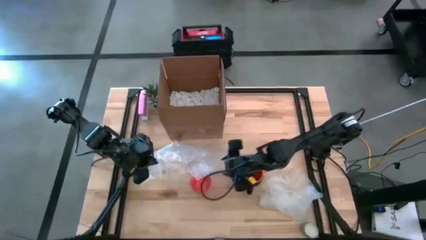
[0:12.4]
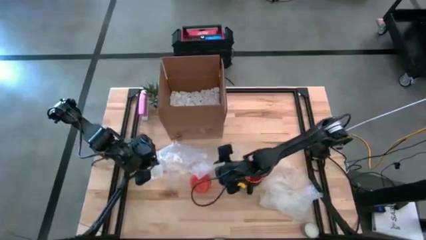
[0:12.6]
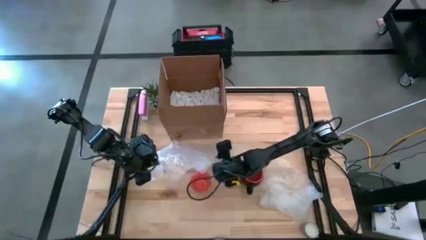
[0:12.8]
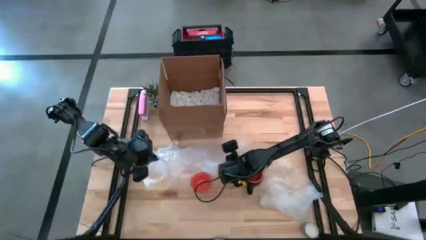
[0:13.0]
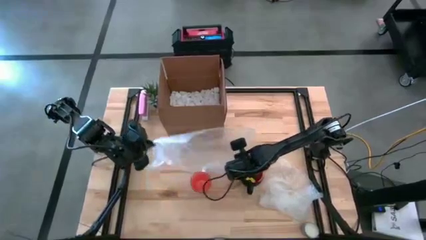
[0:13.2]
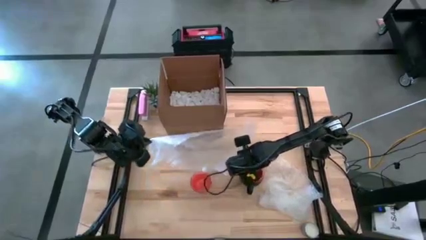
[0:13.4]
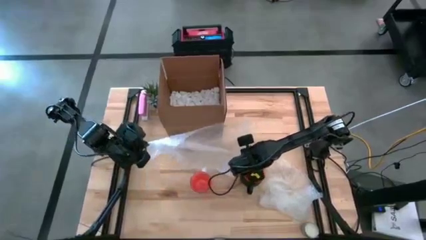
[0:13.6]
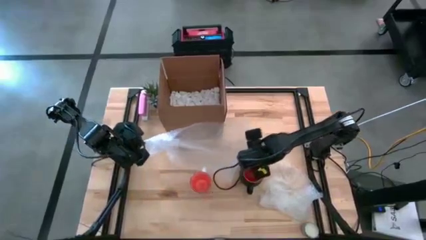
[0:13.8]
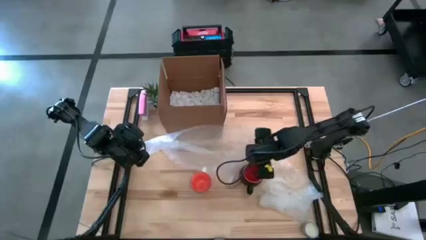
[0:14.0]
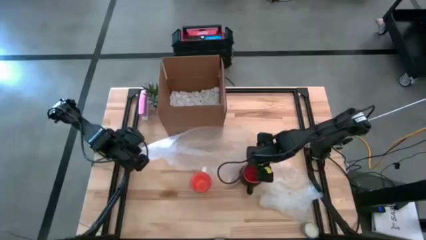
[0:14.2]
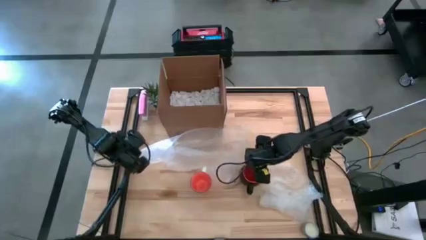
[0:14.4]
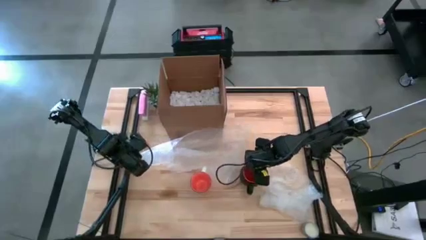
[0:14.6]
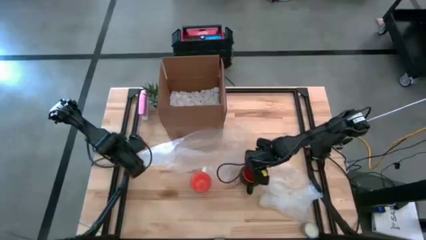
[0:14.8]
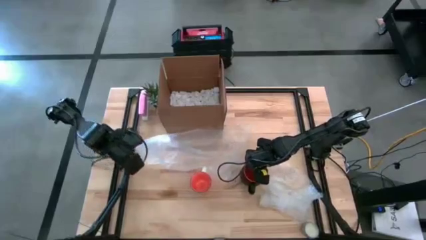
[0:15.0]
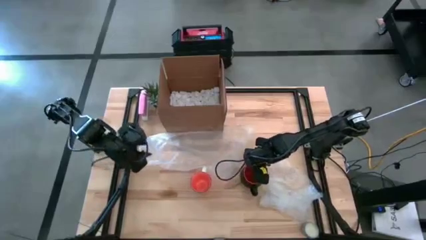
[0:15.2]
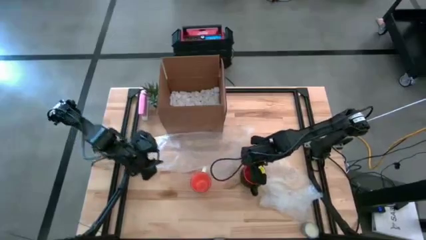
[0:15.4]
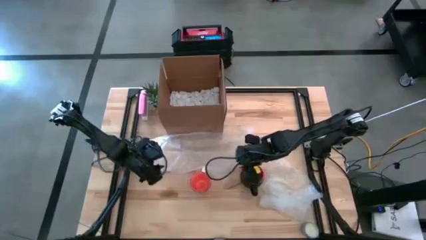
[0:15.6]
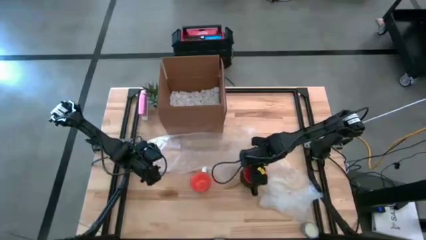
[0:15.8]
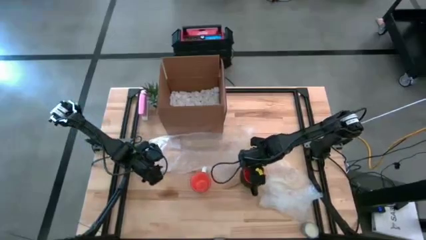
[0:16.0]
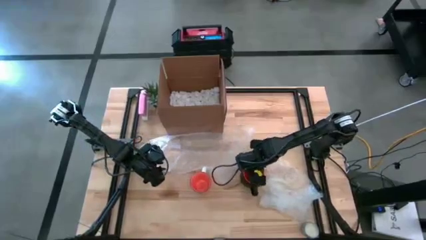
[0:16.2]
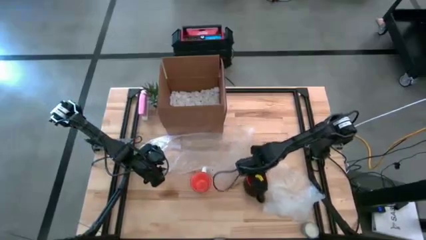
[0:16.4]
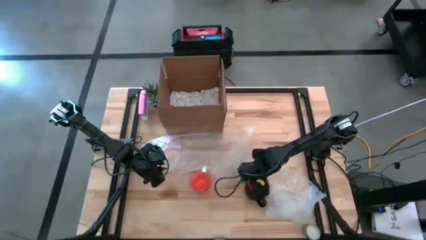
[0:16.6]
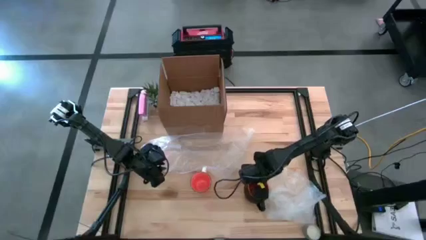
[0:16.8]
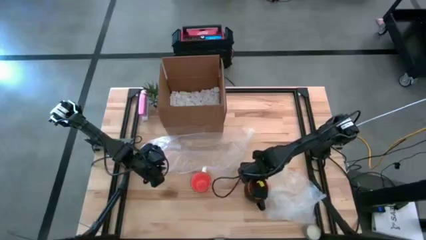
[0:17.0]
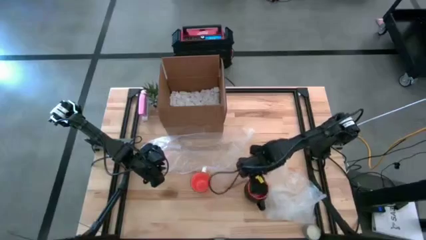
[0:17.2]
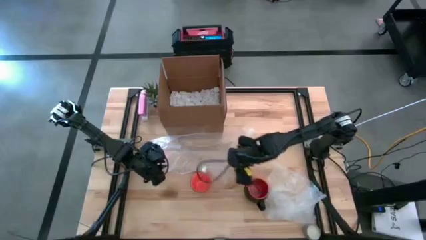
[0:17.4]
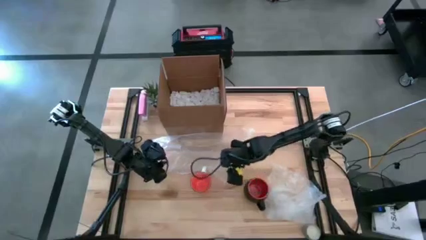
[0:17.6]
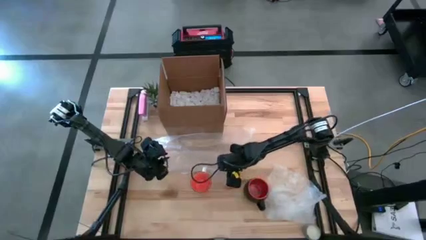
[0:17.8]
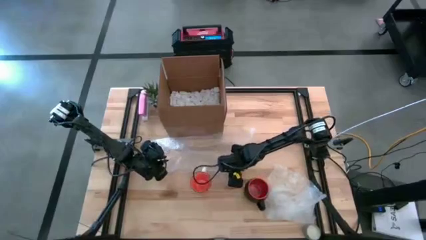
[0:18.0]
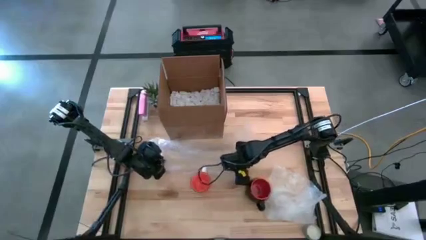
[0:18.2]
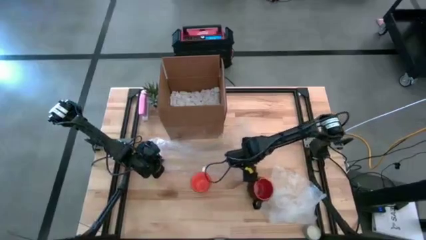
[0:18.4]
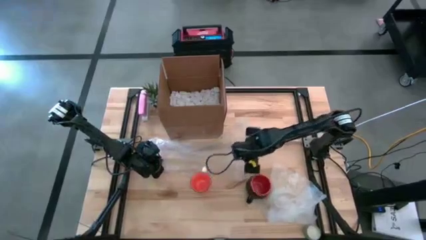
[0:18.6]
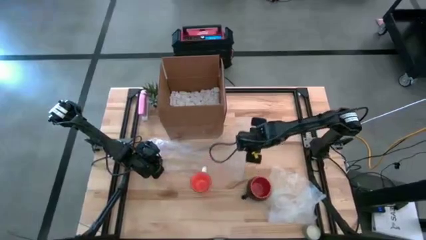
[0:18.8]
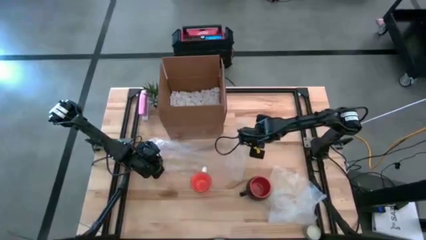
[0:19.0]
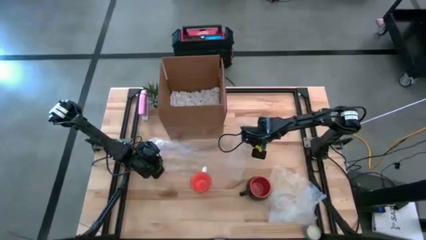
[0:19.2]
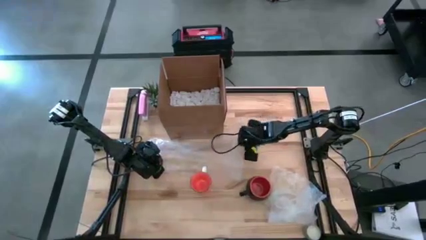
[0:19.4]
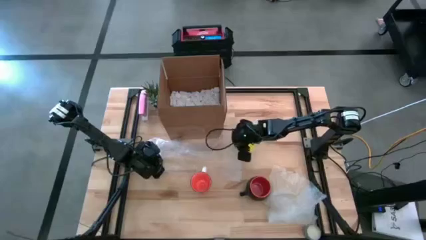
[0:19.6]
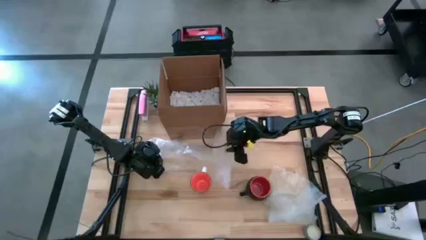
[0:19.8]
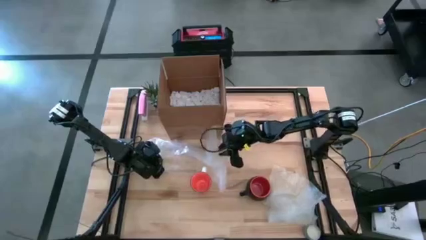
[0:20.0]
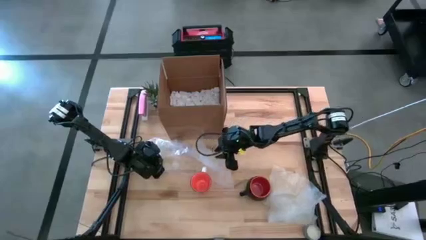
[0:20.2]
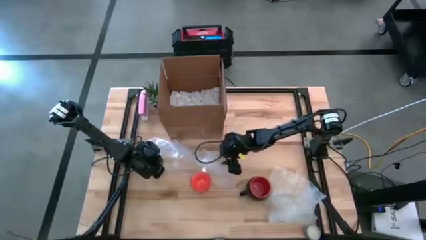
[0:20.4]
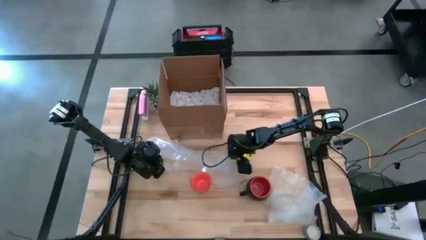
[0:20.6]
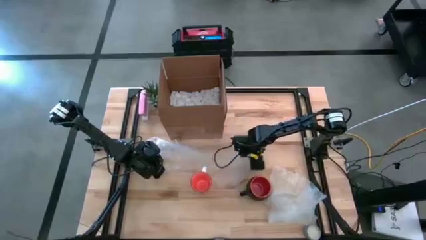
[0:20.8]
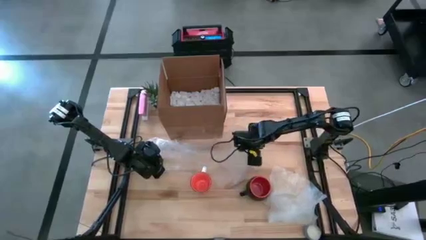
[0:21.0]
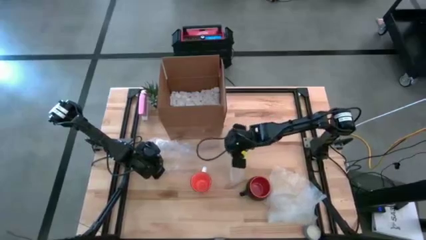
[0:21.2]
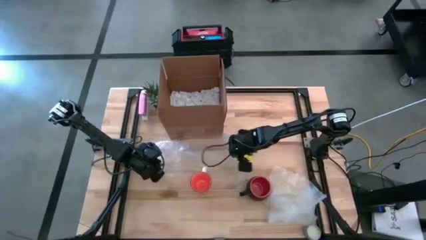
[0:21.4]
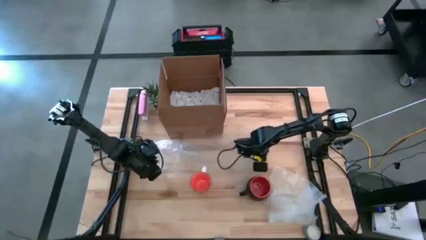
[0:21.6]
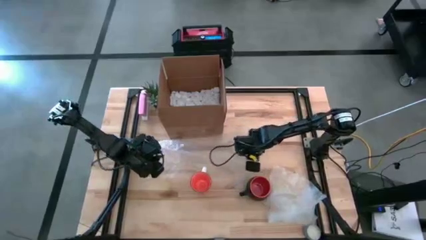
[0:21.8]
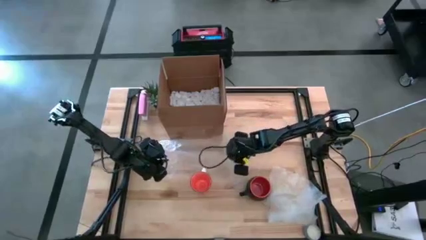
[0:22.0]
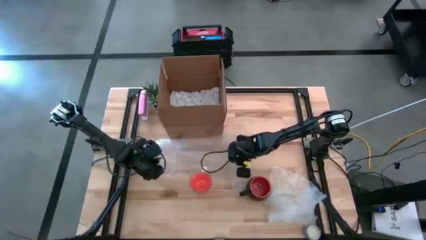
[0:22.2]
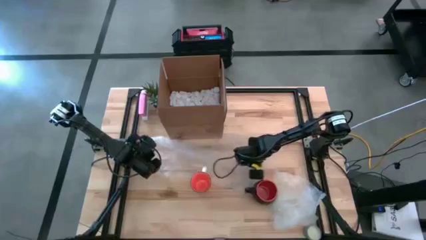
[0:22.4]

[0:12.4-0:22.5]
Task: wrap mug
Prepare the left transparent bubble wrap

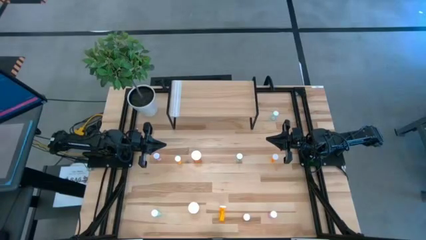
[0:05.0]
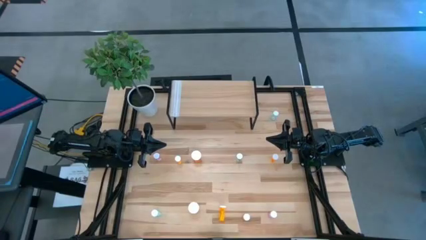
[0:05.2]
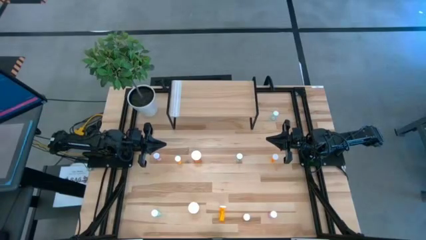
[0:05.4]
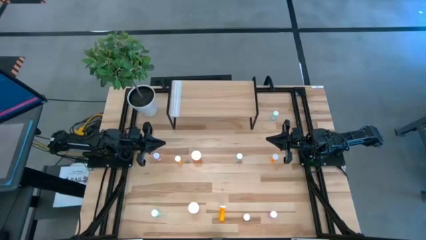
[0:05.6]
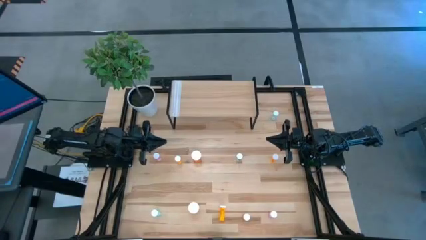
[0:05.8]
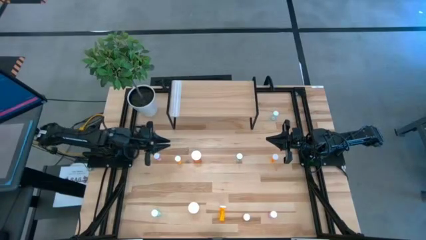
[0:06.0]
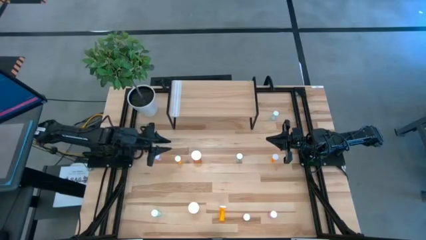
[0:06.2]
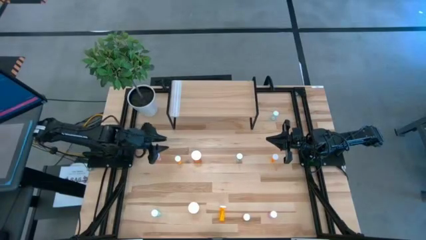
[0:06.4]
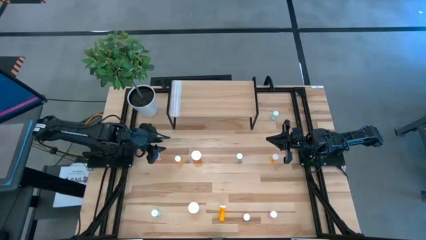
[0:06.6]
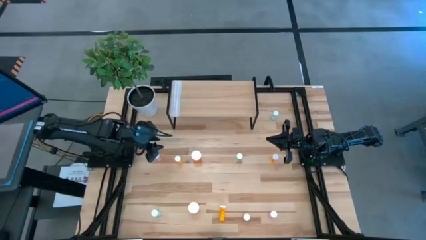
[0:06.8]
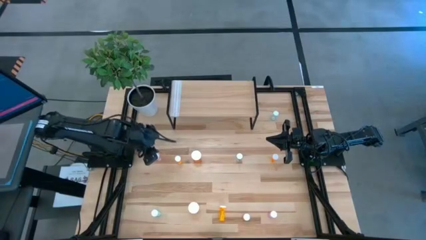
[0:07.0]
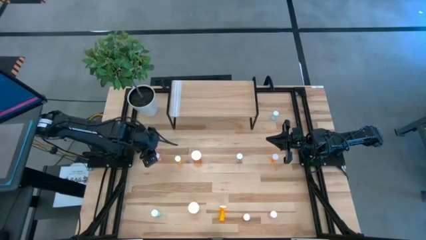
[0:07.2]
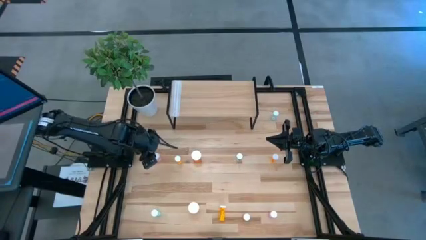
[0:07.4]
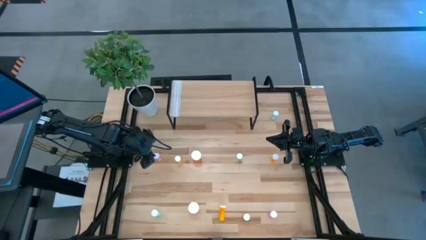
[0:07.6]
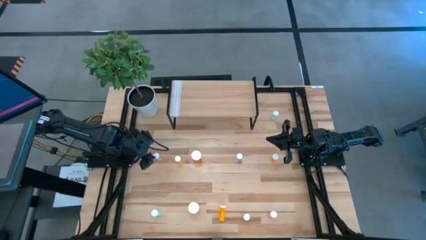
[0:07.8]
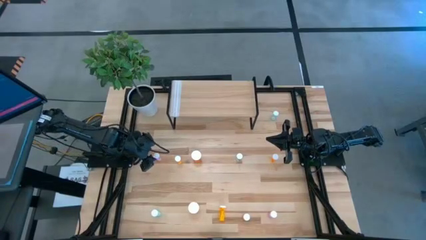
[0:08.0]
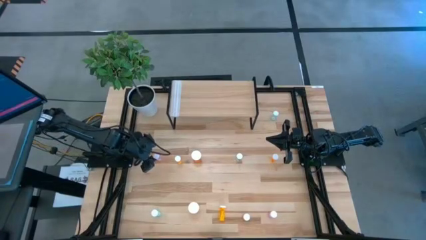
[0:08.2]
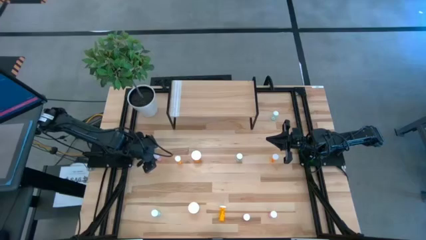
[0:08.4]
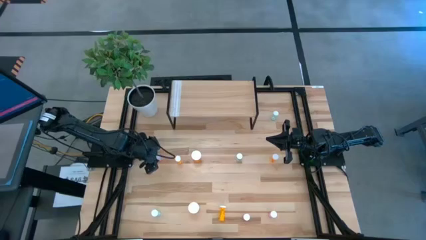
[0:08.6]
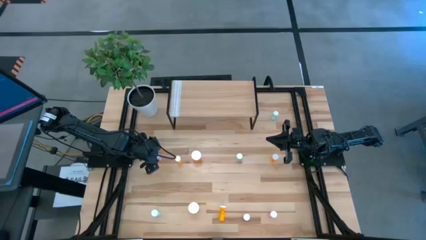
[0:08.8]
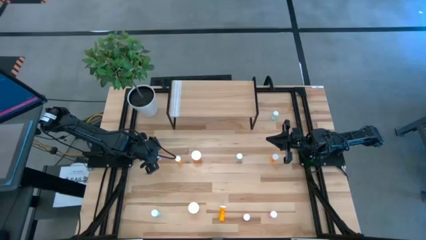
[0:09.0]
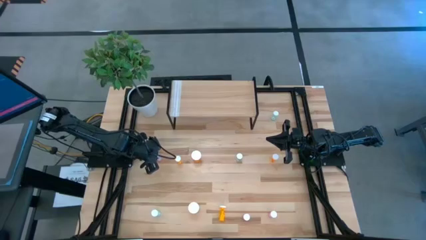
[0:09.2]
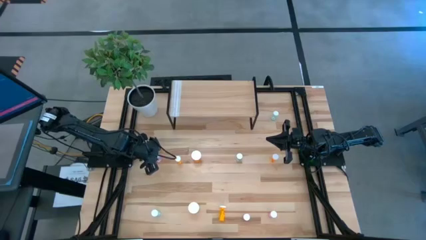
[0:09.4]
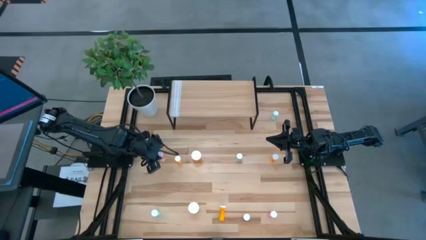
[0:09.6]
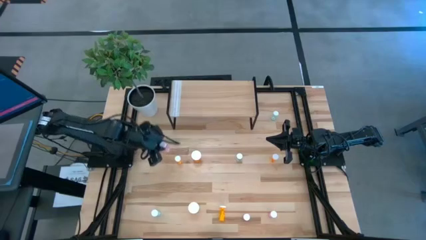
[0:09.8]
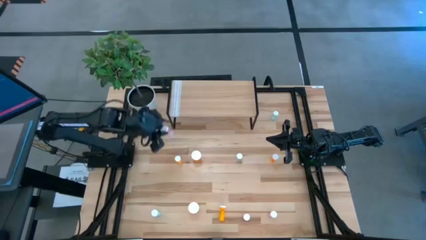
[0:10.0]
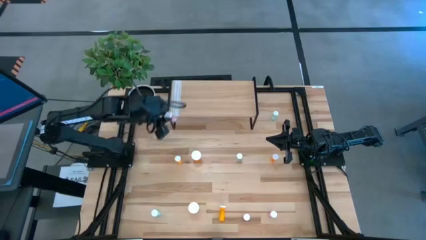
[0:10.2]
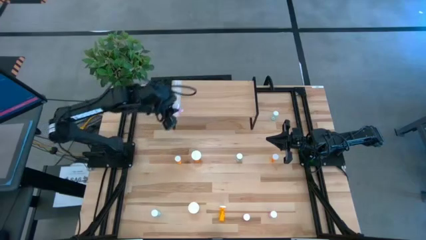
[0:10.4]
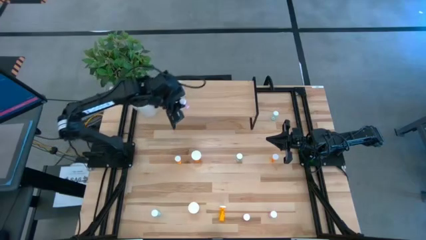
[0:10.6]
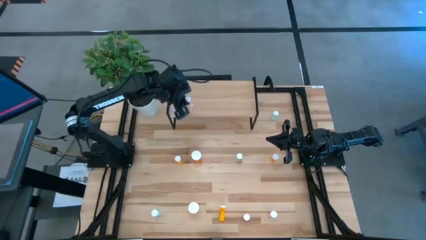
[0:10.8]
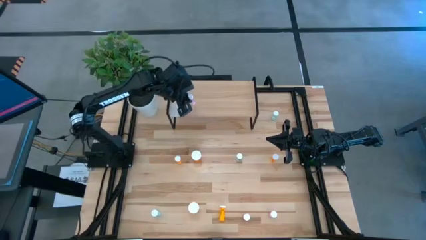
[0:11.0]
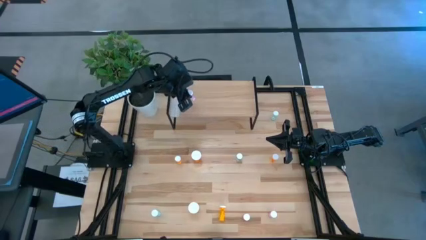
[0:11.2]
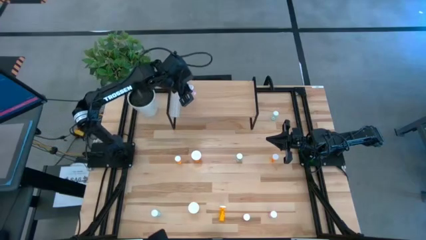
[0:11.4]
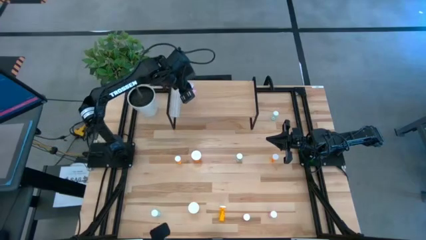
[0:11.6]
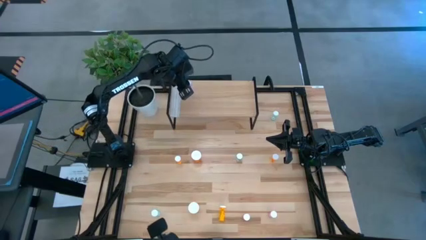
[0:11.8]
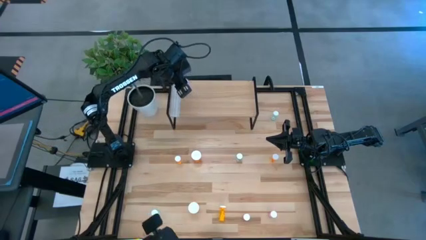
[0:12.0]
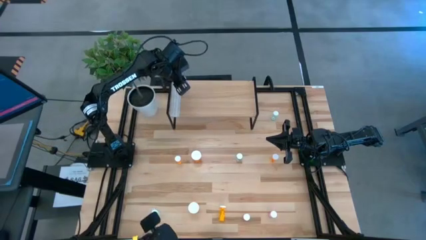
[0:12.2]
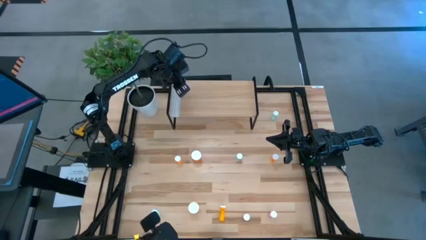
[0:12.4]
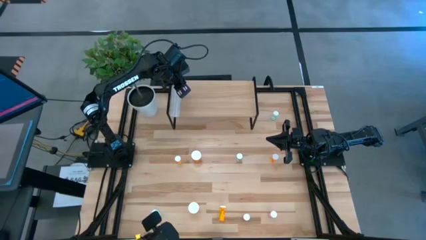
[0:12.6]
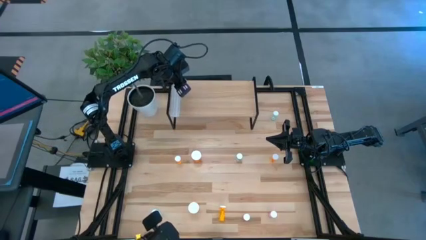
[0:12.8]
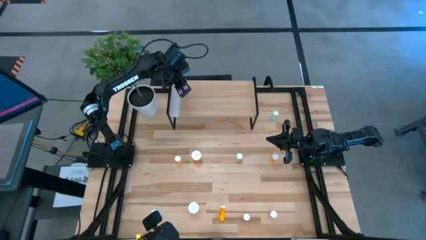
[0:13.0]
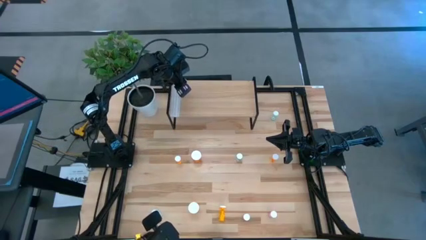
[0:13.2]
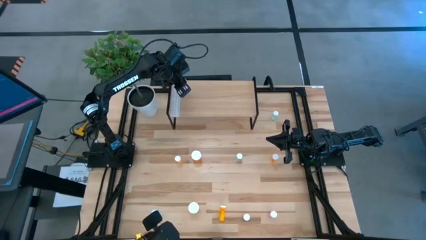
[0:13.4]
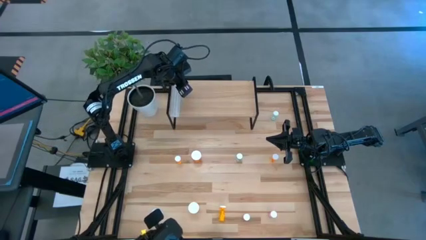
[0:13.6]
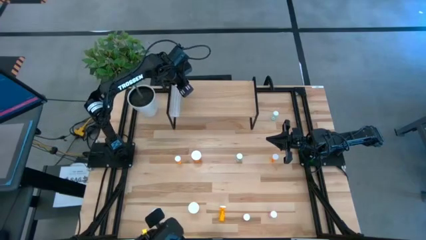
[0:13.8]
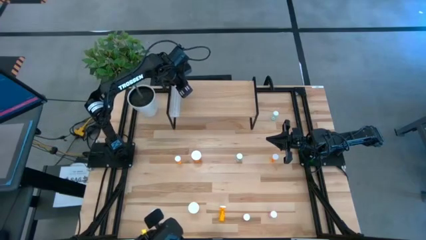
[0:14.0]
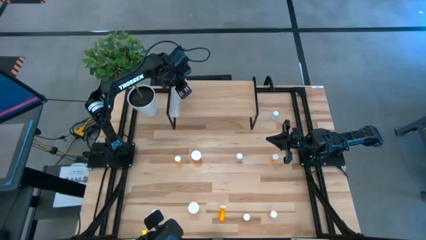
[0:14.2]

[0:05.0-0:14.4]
Task: Pick and place medicine bottles onto shelf by color
Put the top left pink pill bottle on the shelf
